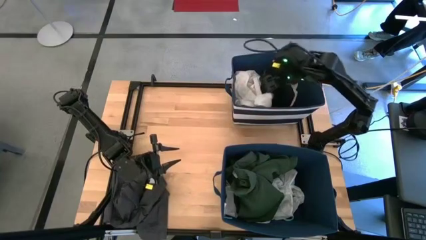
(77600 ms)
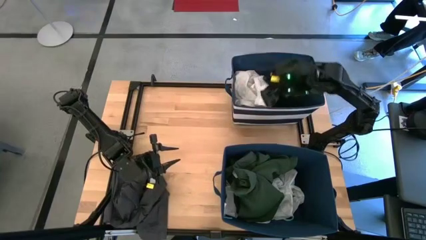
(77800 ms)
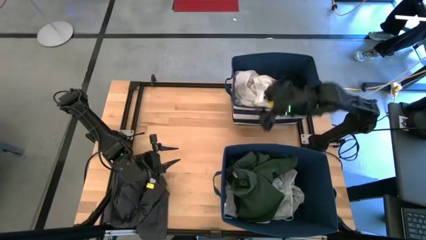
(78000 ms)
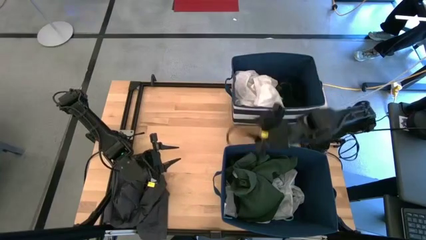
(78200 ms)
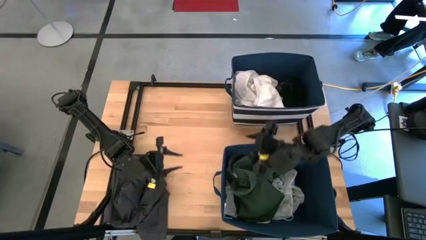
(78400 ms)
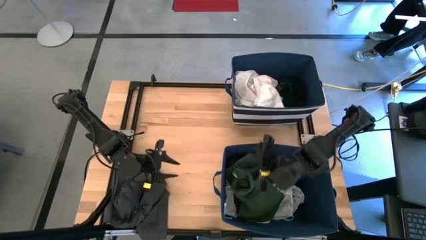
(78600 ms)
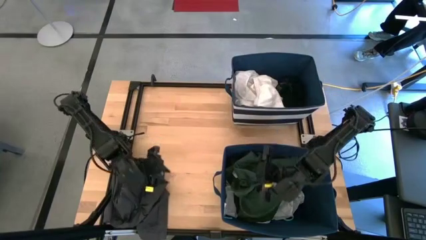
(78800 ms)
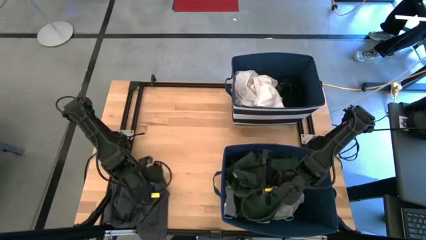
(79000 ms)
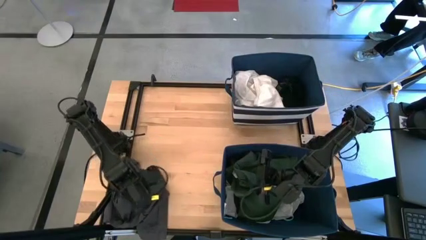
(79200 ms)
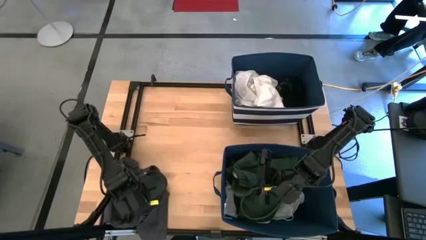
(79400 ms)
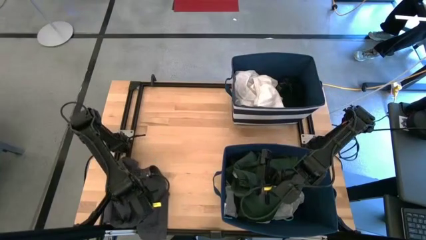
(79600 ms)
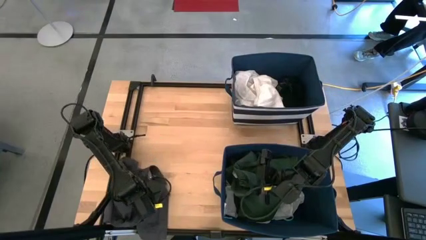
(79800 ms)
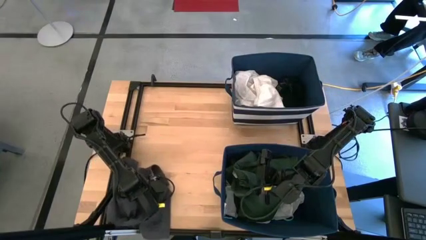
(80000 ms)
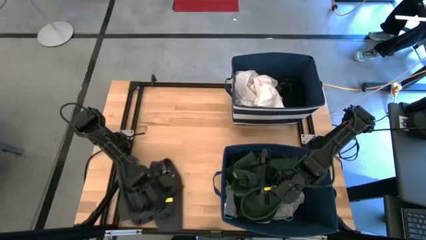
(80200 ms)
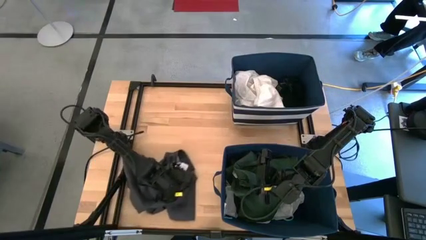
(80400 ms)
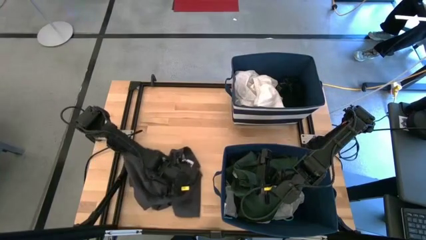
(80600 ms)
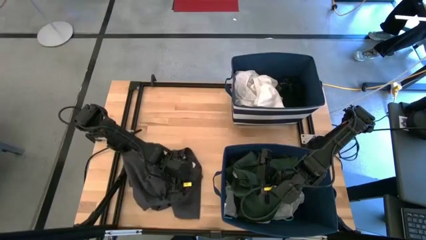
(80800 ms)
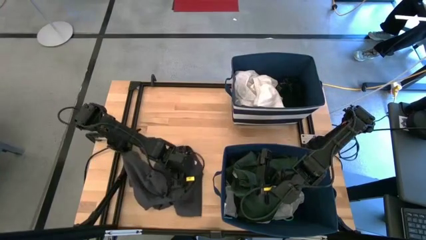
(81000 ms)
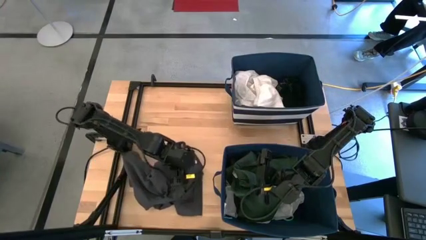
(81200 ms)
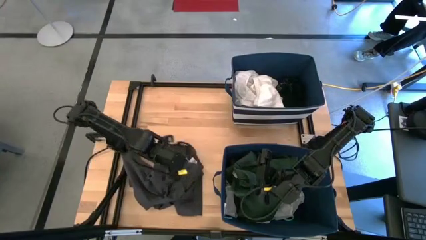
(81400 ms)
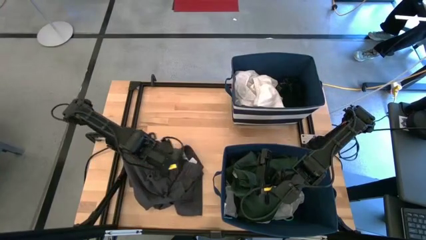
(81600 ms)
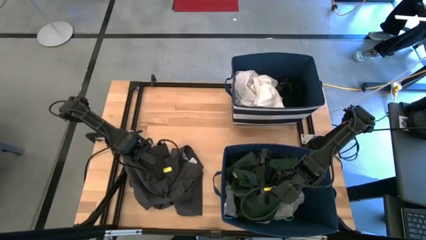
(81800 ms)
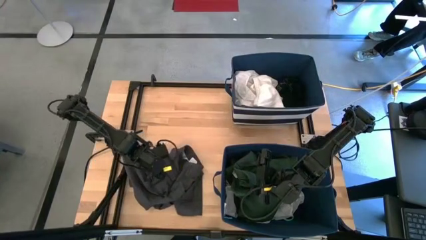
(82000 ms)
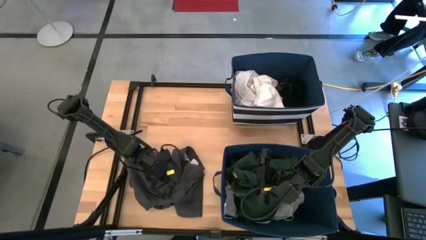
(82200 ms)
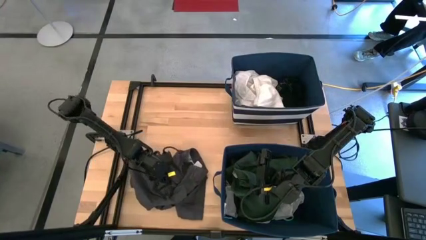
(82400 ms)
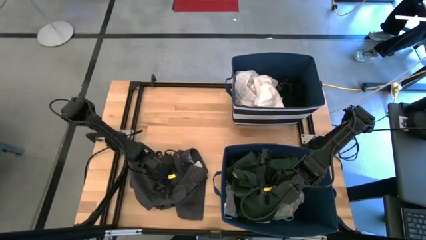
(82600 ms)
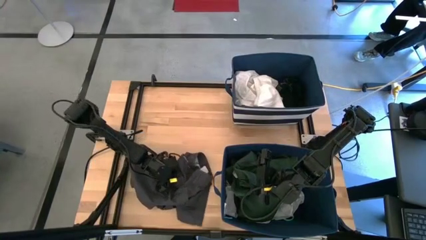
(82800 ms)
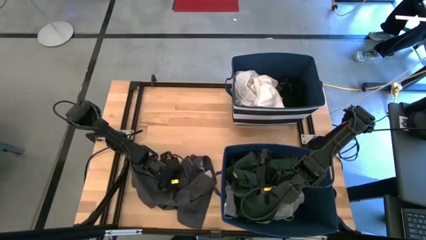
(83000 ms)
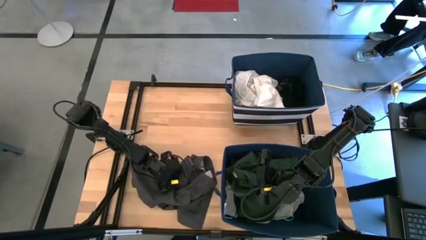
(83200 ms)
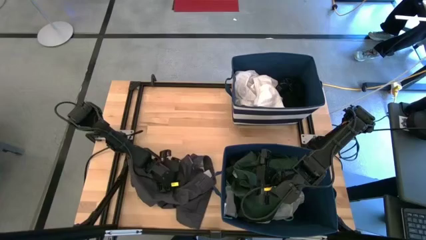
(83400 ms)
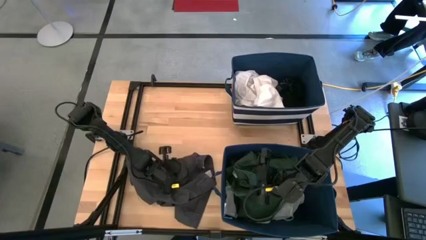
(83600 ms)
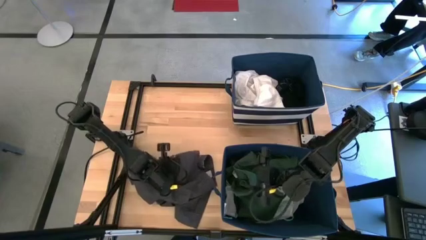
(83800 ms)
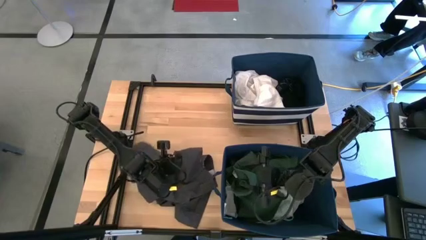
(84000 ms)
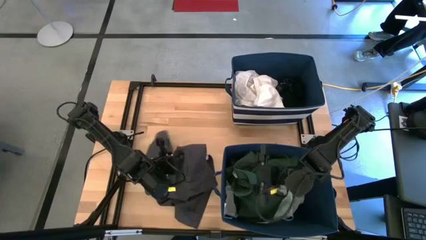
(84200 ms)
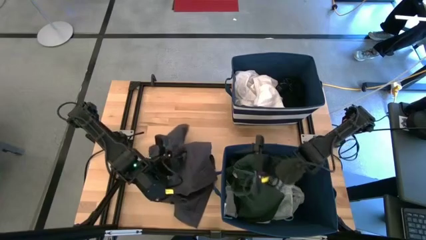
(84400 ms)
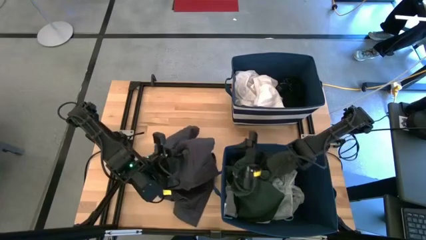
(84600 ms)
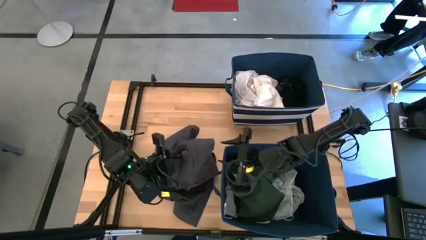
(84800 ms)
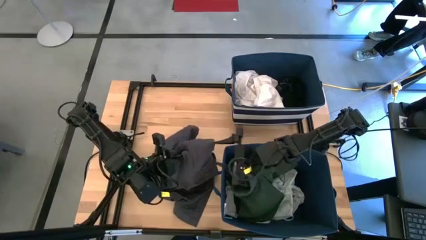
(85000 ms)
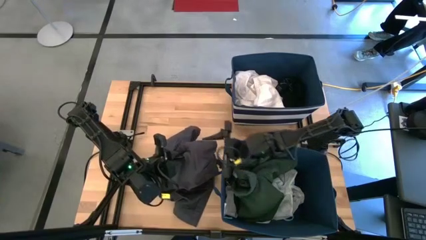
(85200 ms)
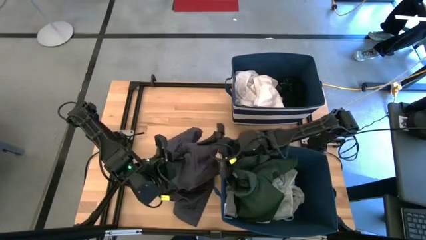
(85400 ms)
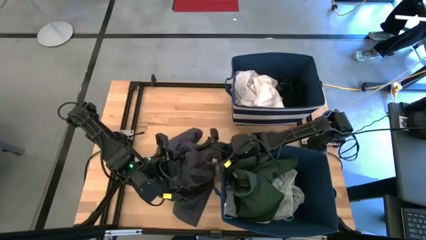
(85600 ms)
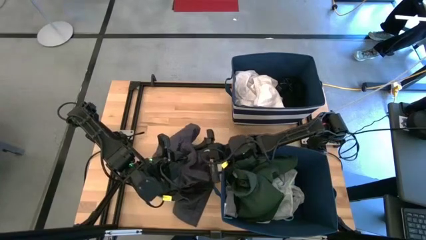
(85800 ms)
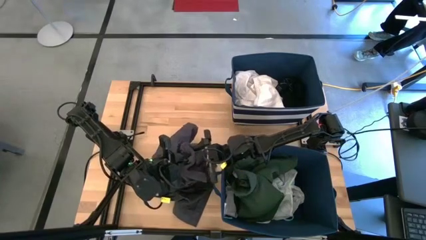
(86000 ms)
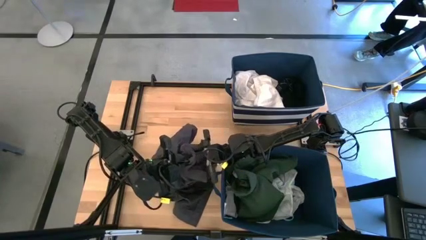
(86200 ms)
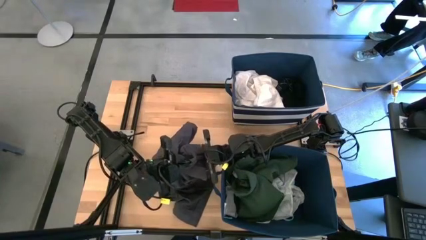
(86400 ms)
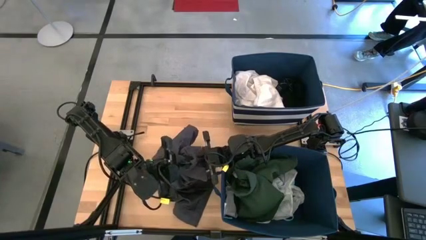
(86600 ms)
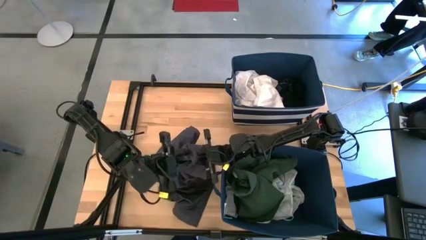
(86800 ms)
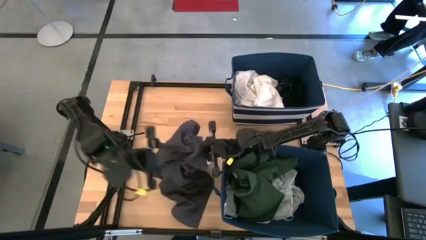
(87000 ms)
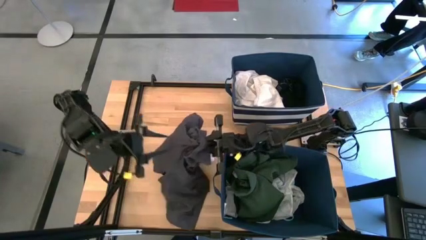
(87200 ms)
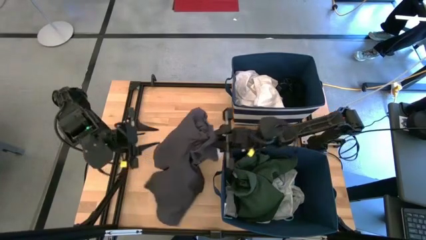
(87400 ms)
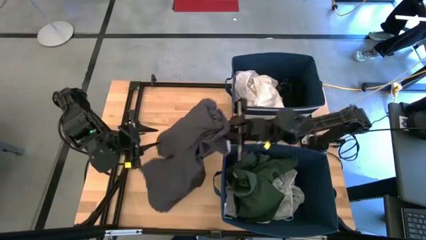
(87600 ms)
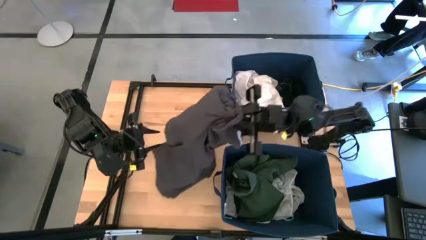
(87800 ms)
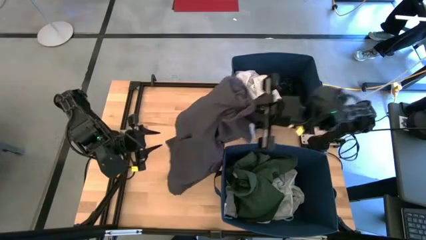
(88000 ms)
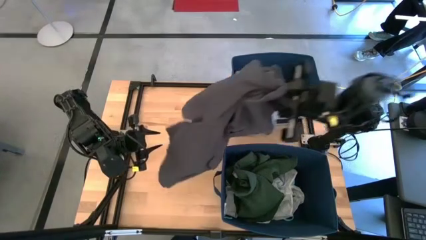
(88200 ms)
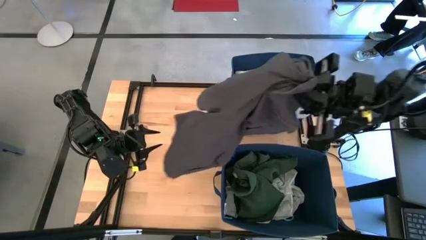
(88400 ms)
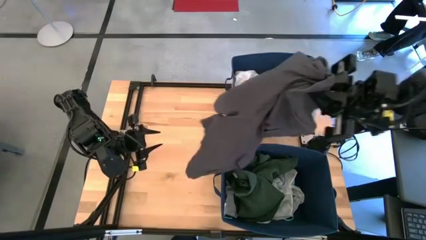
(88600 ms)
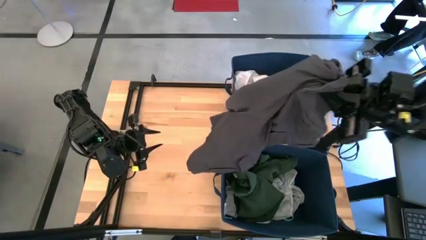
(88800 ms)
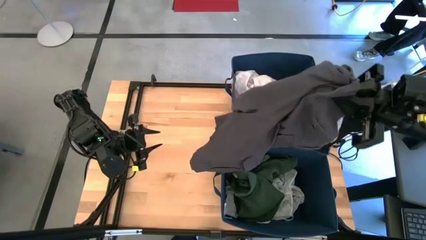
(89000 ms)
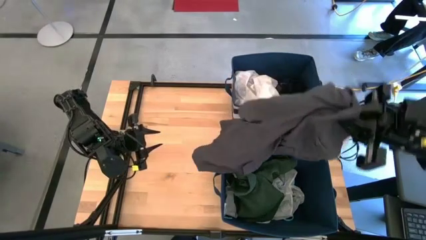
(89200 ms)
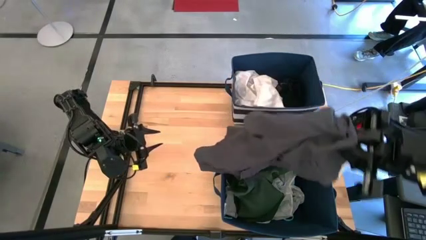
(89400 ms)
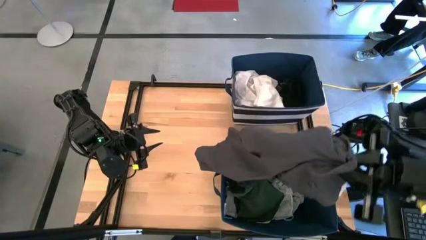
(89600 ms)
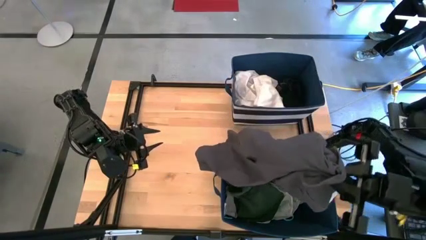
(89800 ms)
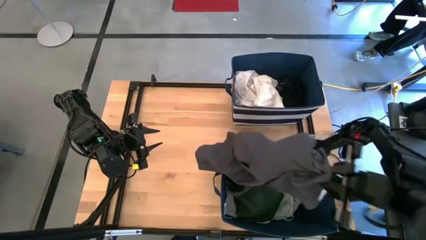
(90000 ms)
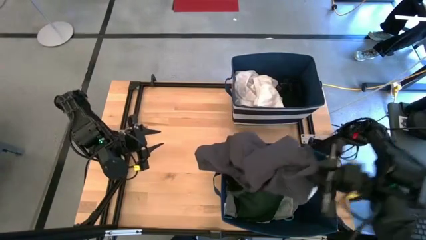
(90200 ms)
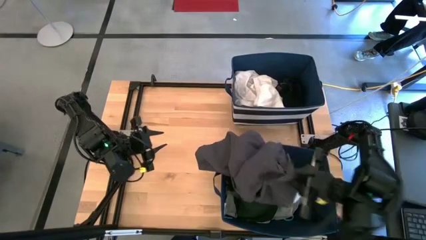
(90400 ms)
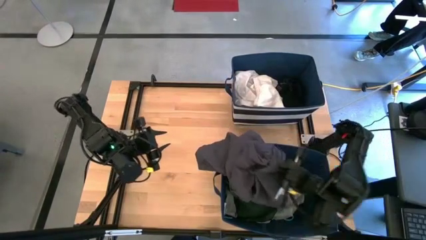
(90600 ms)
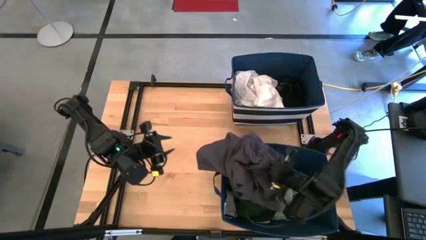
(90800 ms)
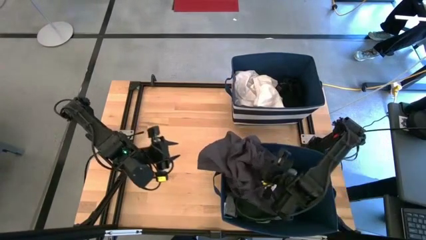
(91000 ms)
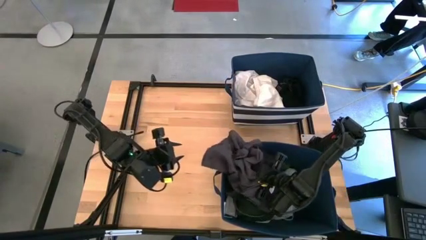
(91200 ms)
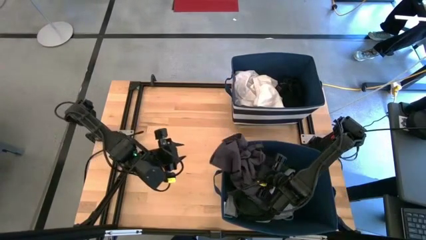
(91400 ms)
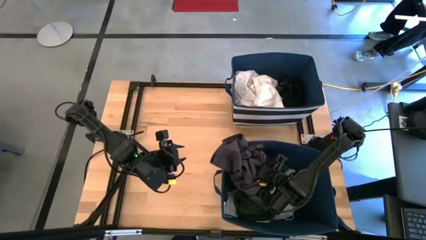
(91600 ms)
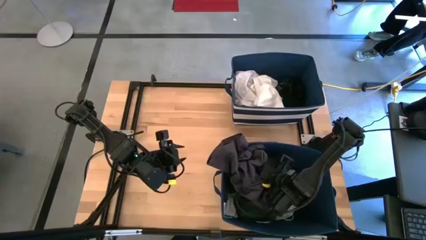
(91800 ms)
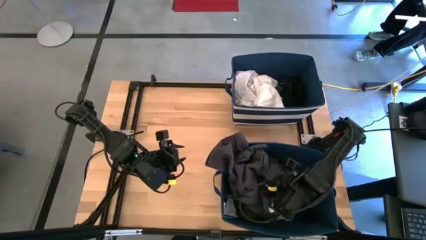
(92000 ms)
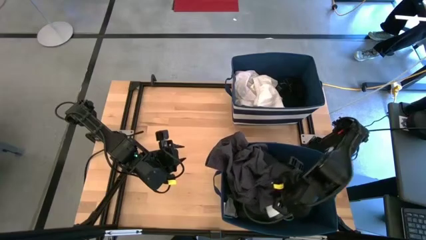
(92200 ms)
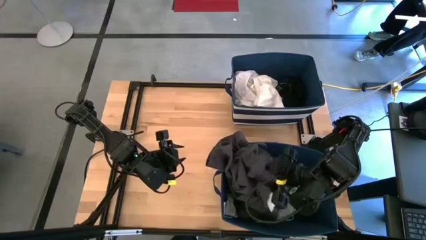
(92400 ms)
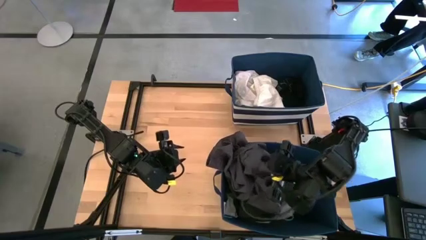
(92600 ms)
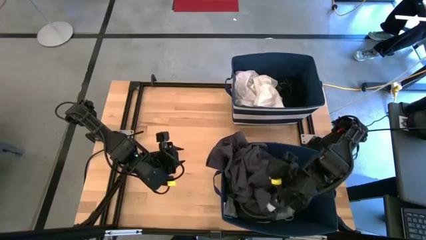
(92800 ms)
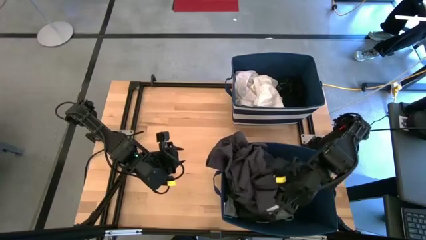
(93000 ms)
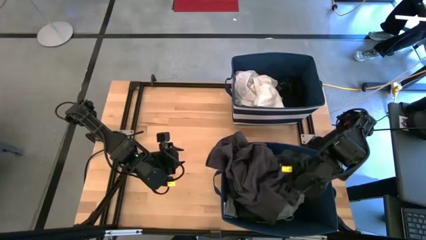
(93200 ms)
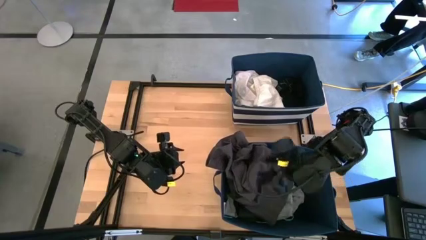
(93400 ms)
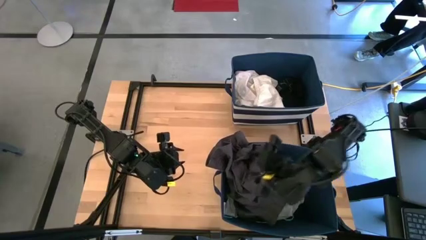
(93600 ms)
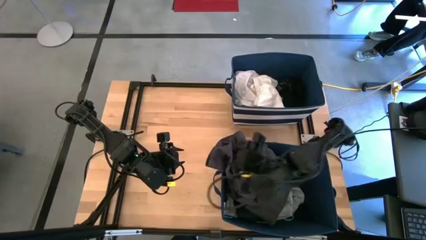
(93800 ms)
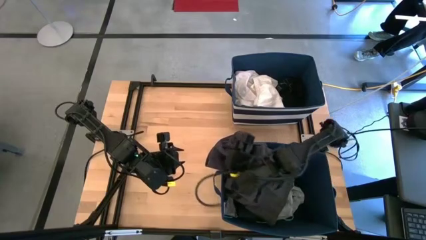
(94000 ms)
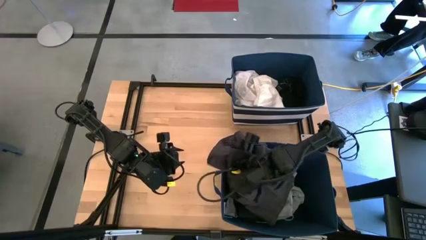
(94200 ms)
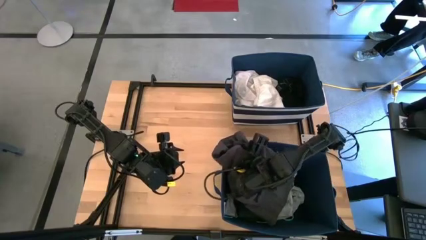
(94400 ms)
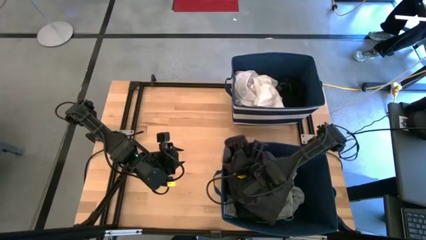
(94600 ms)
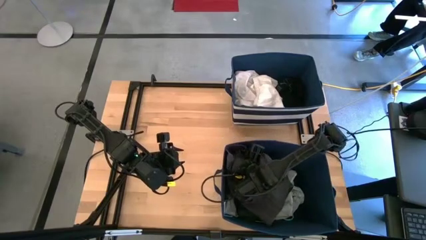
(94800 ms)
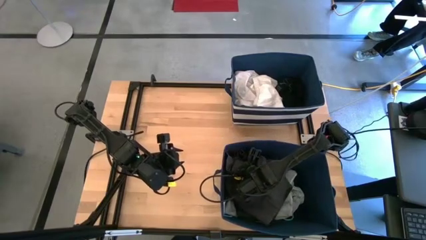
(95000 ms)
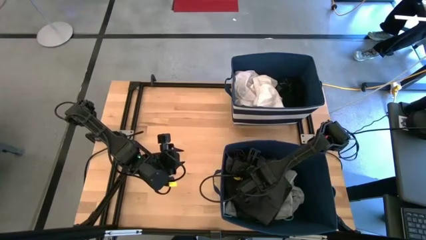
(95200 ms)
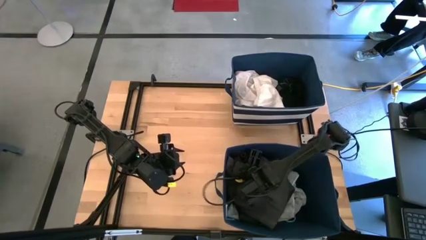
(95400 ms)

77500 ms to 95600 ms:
Task: Sort clothes
Put the dark gray shorts into the bottom blue bin
